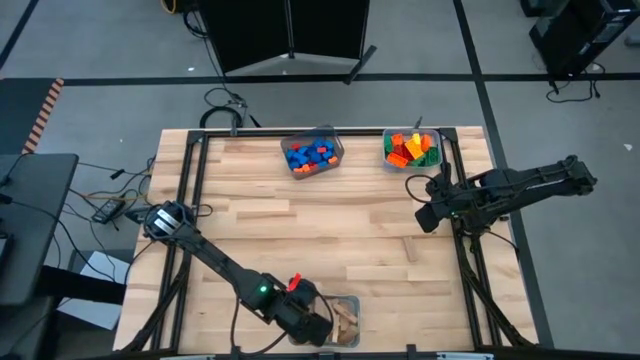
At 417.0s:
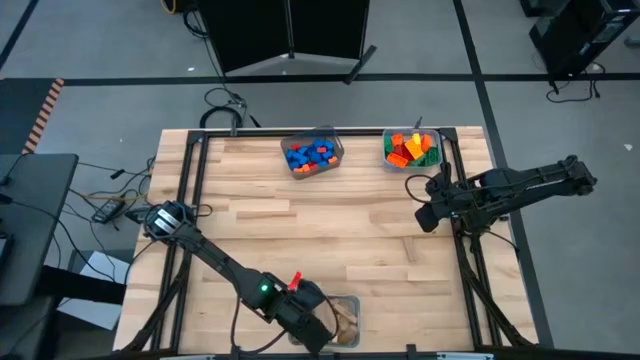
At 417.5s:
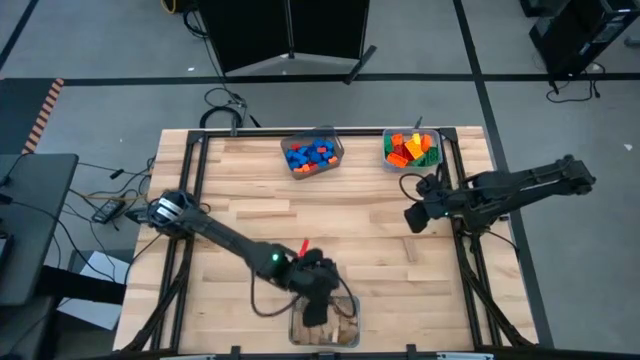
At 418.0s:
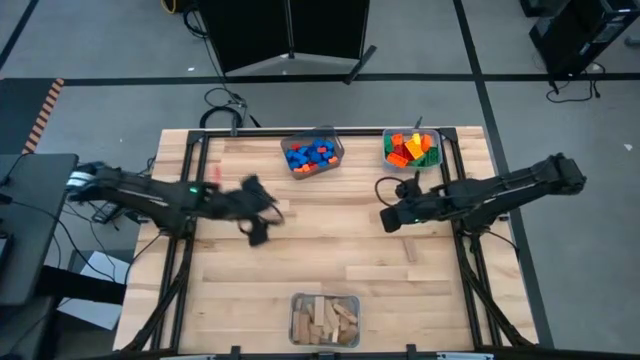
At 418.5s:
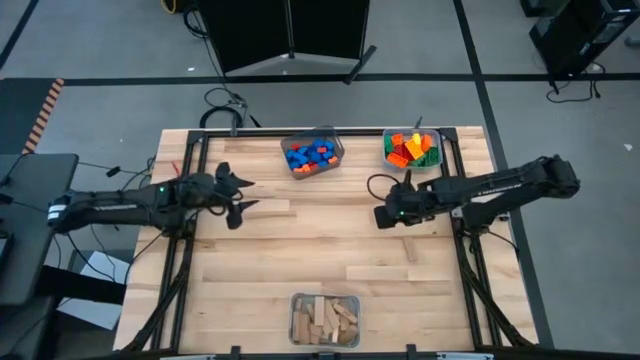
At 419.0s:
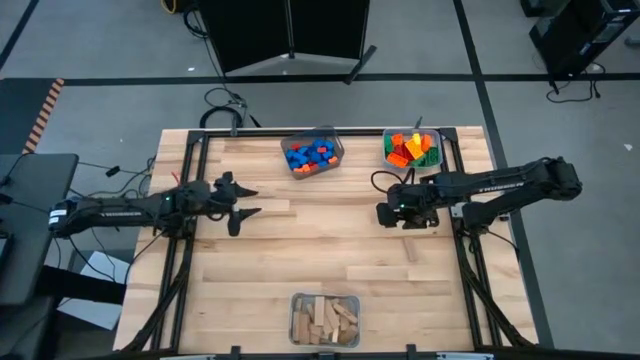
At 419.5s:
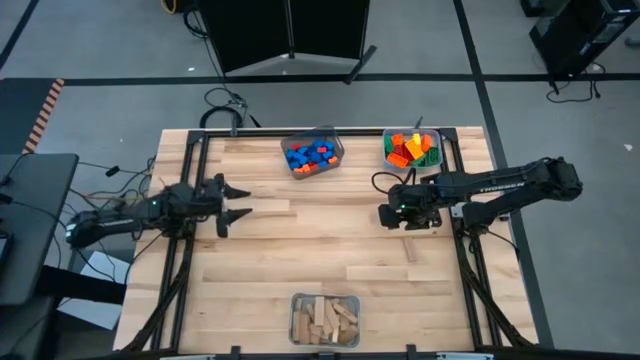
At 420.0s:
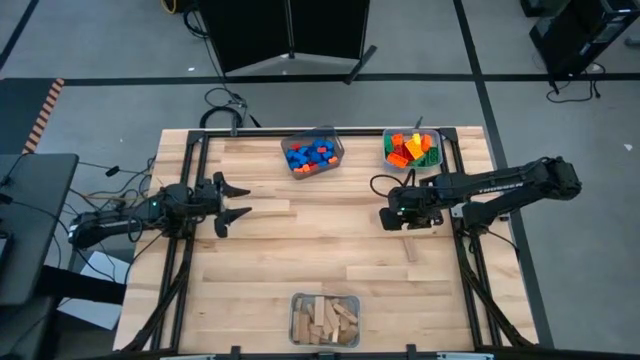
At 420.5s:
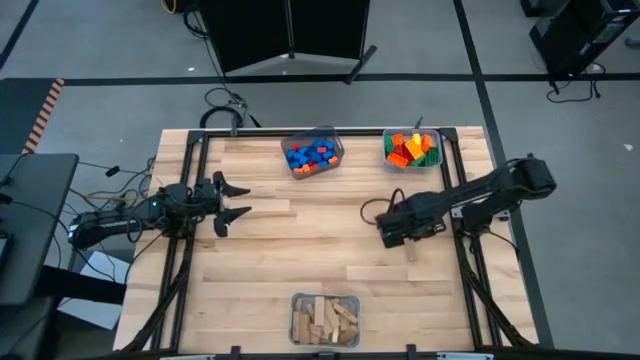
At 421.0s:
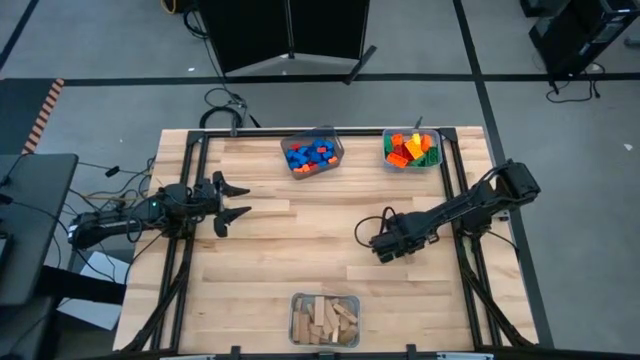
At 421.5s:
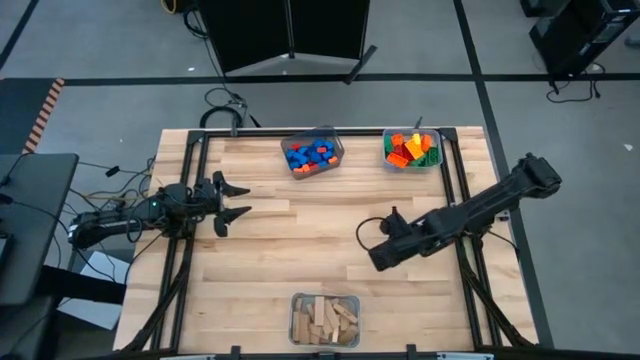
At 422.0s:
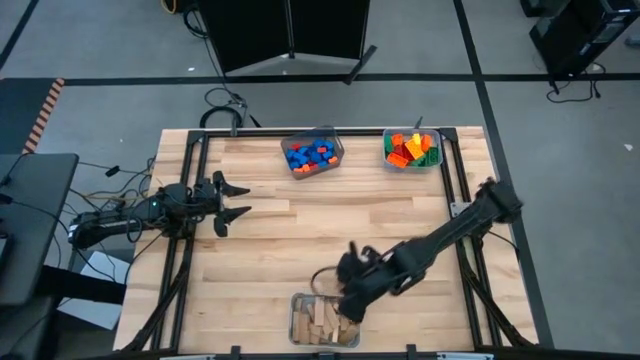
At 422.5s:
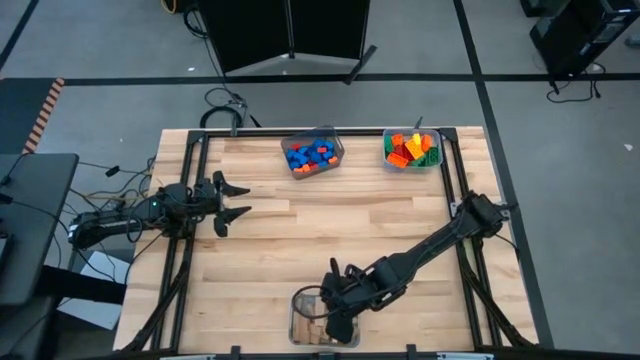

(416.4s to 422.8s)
Task: Sort blocks by size
Put the brown block into the gray bin

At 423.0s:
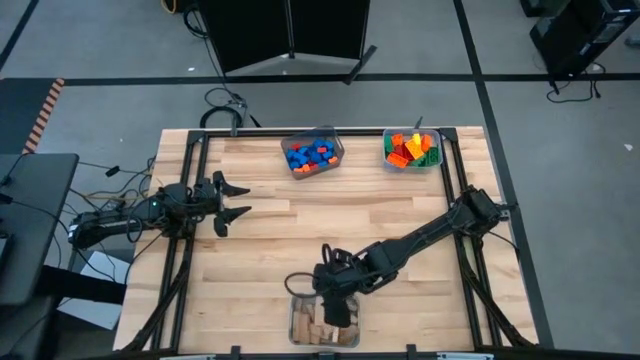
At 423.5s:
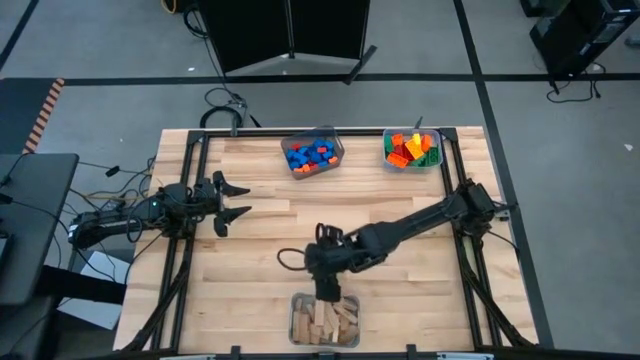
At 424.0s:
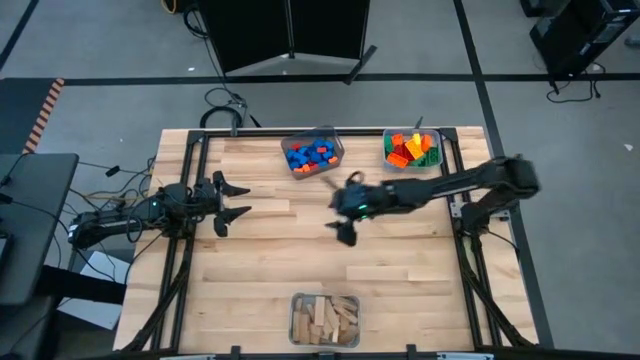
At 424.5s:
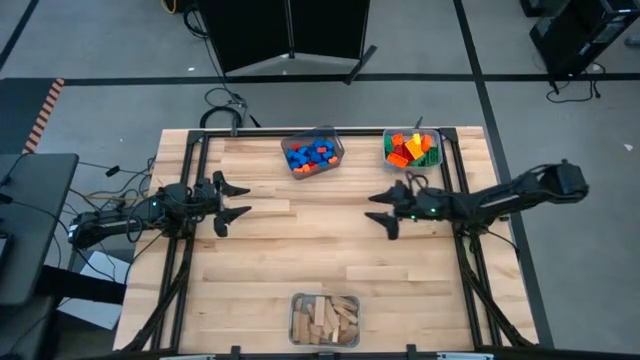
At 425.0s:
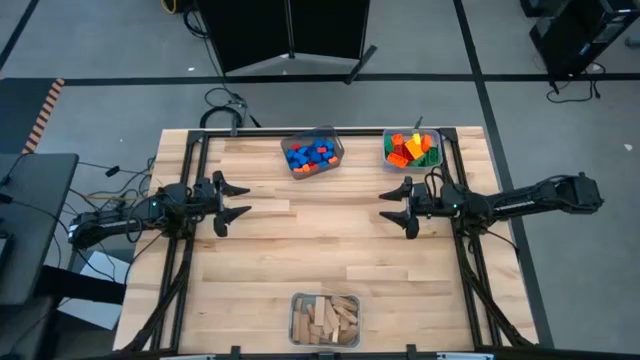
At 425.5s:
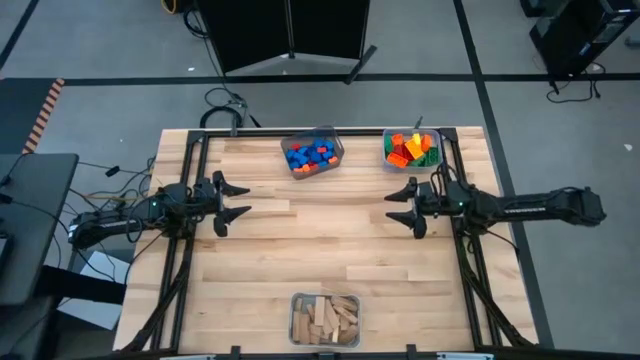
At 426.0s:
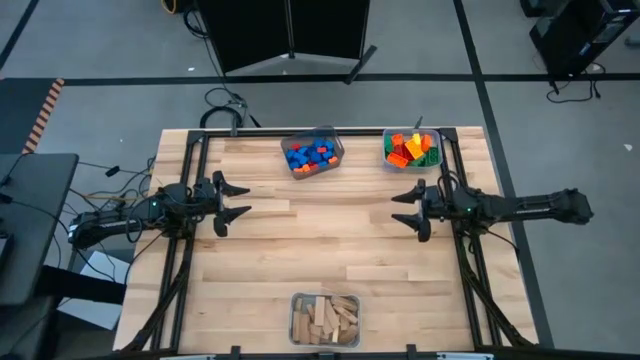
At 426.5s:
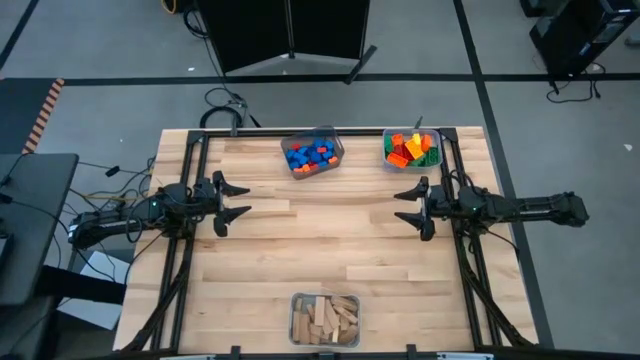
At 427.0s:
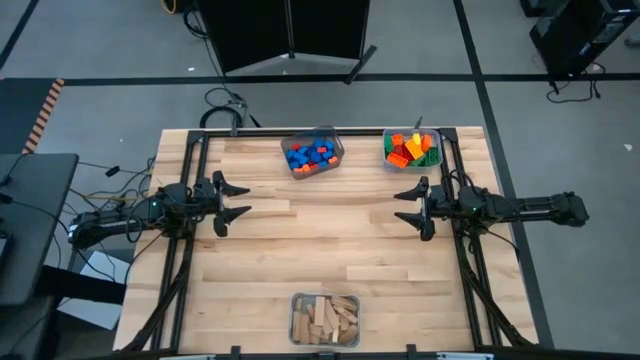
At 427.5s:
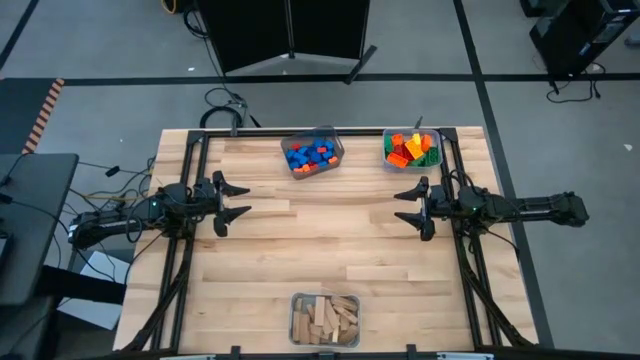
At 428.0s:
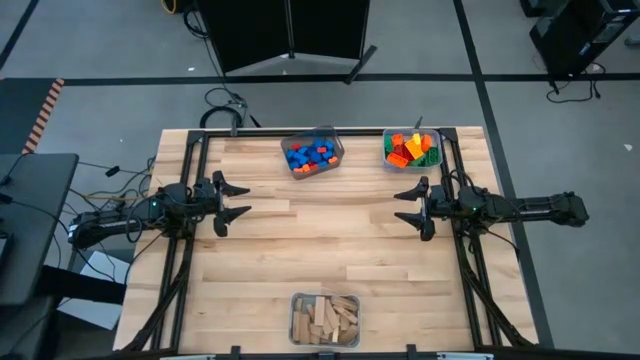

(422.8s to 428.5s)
Return to Home Position

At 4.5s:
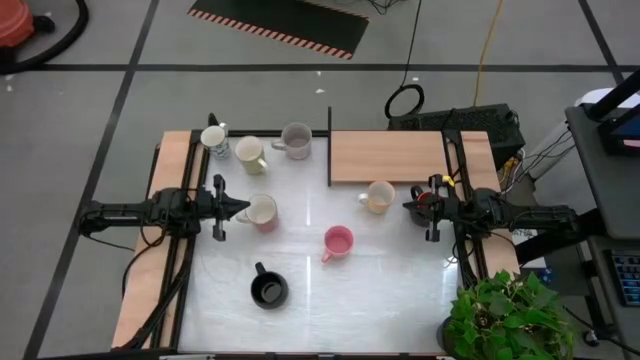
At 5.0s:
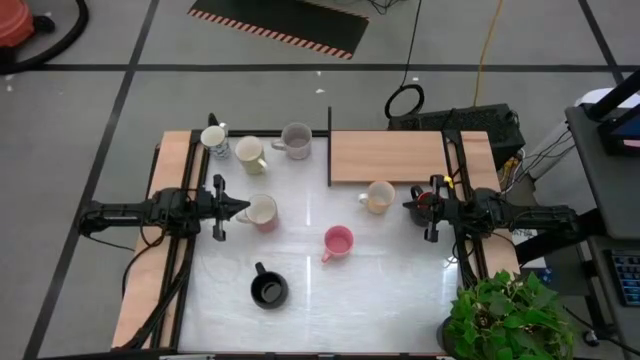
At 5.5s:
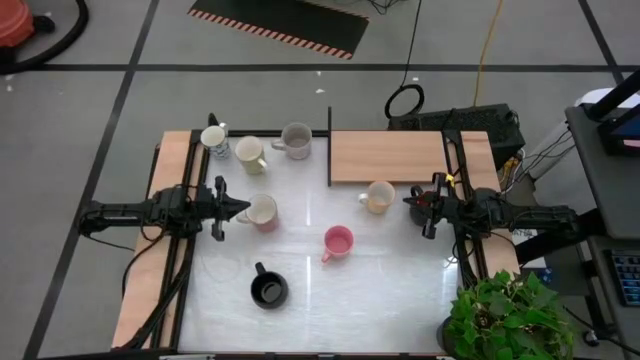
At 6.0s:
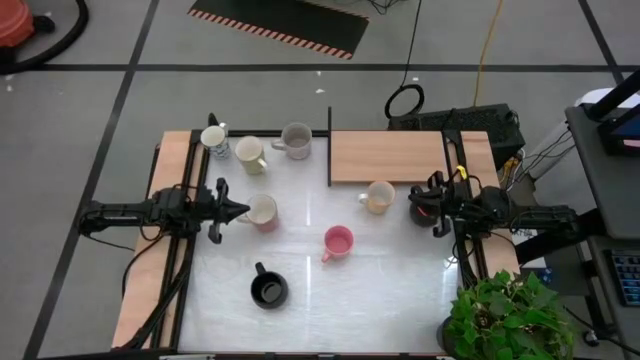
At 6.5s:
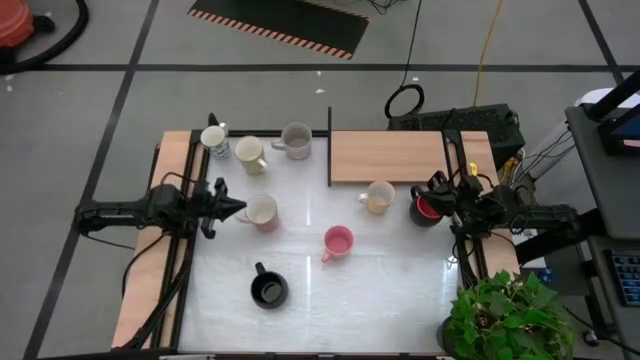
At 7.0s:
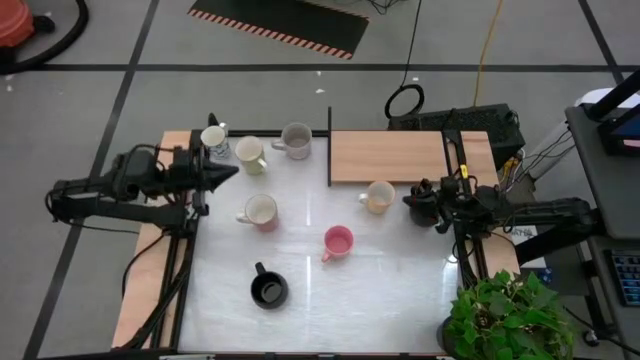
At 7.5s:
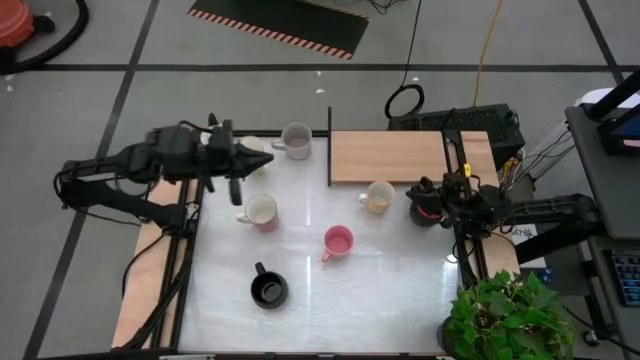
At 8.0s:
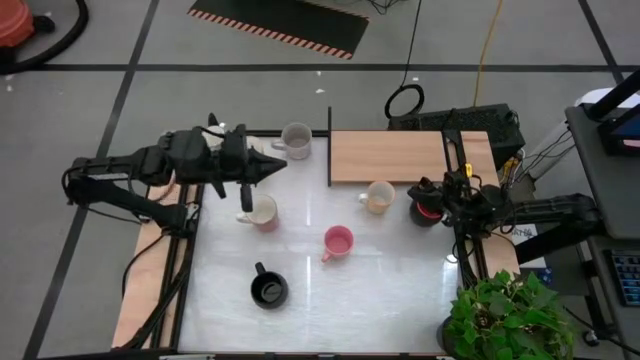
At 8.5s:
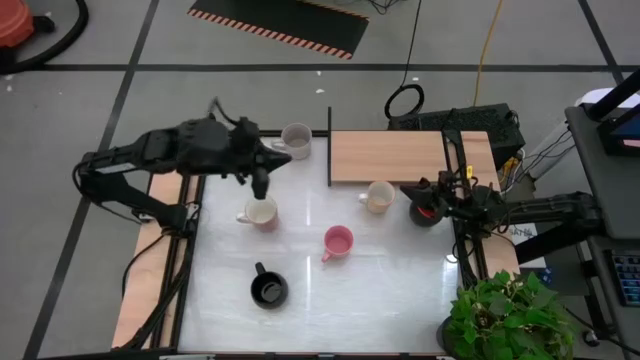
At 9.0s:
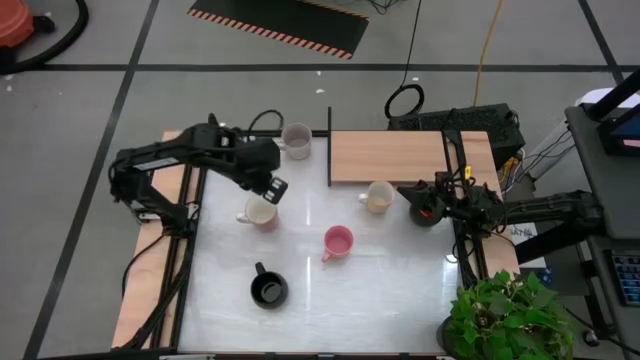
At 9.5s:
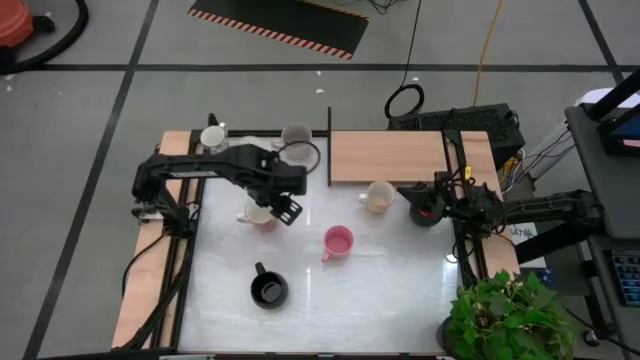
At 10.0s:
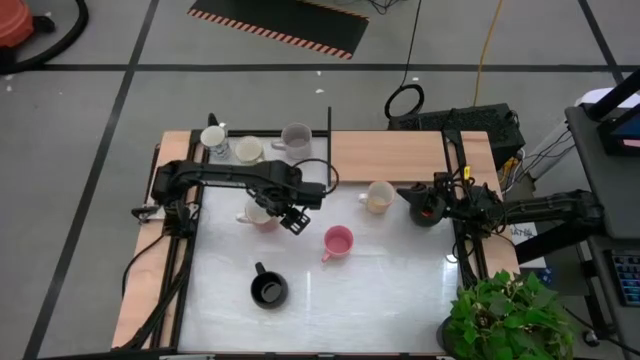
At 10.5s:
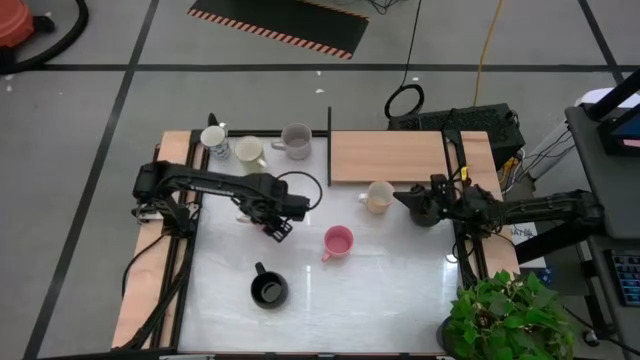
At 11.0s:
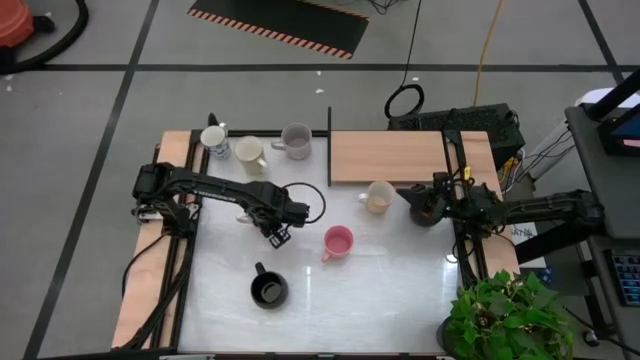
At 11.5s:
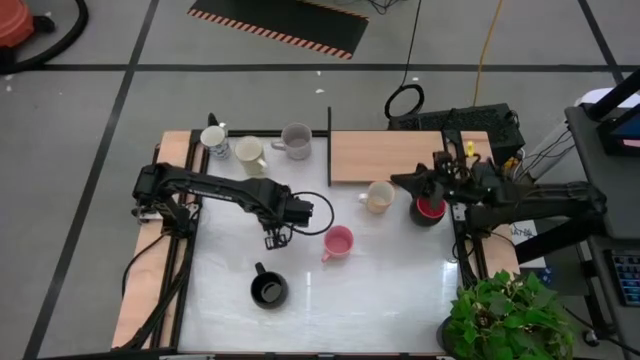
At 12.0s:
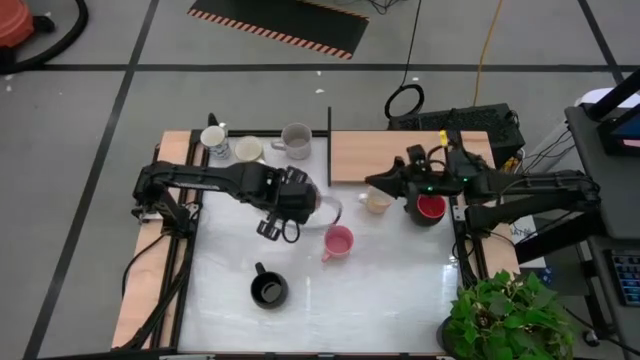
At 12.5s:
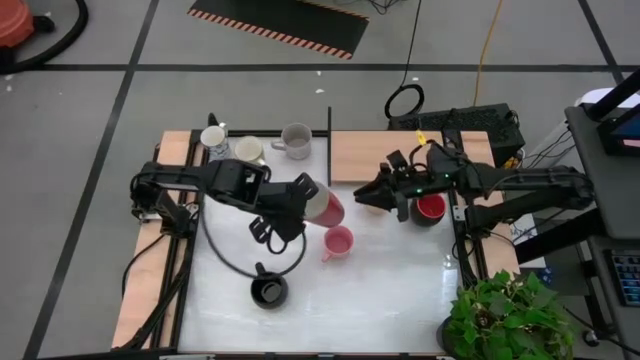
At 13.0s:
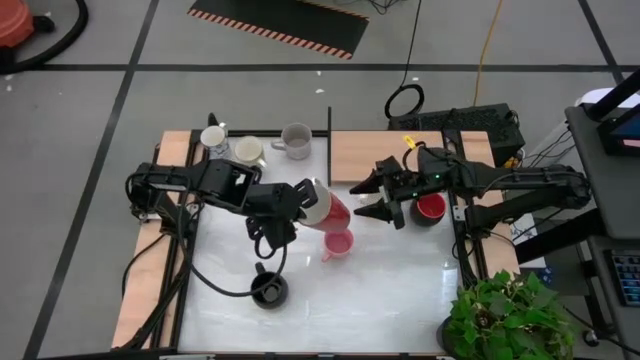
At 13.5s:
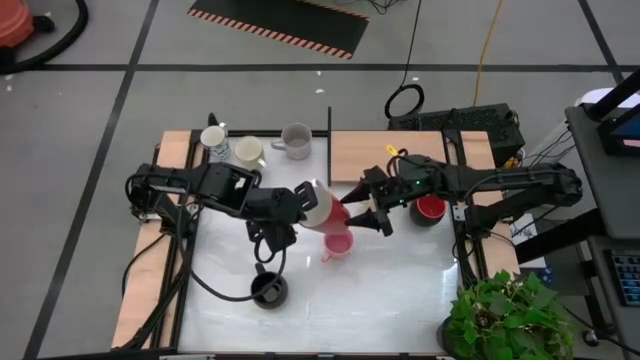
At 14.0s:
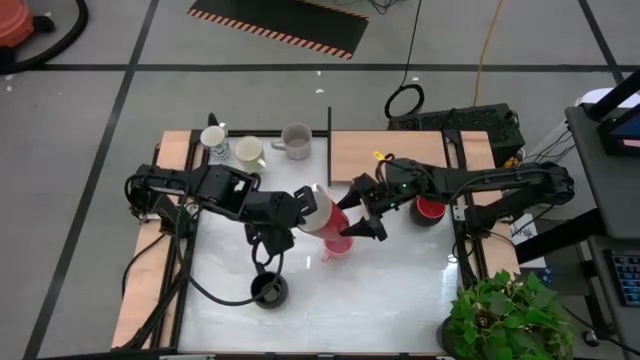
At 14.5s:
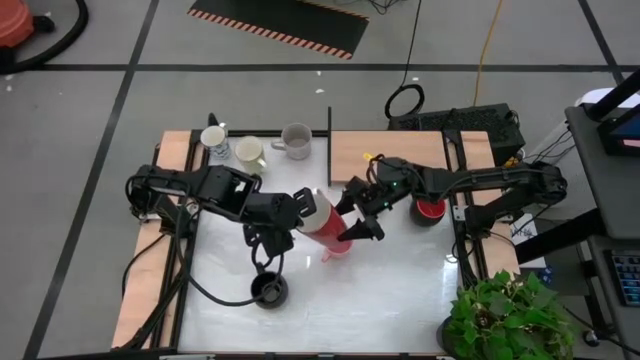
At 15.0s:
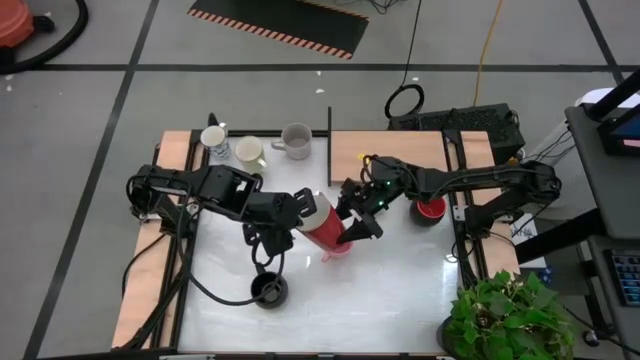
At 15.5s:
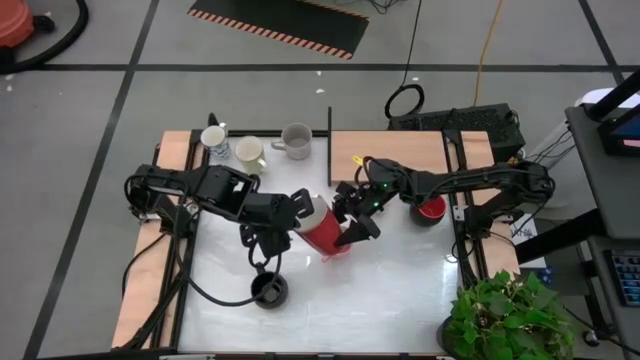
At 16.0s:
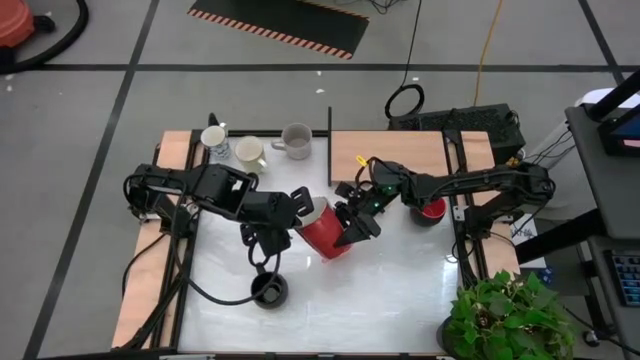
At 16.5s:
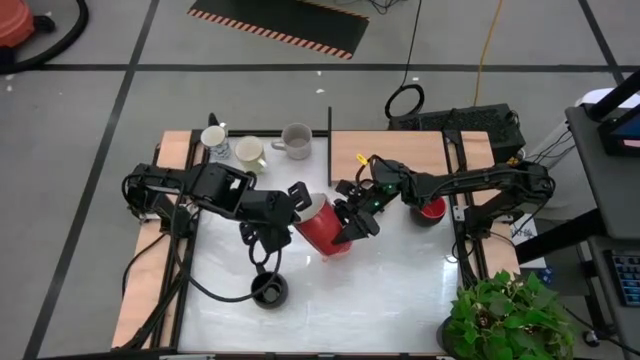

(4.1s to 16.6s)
Task: Place coffee mugs
Put the orange mug on the shelf
